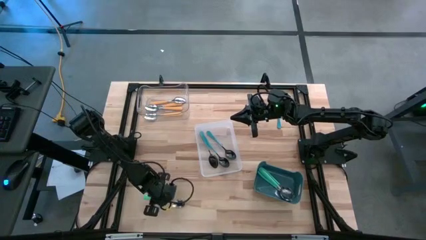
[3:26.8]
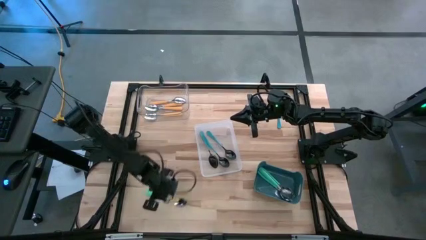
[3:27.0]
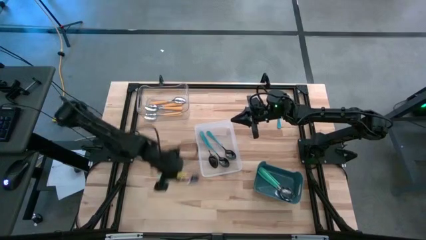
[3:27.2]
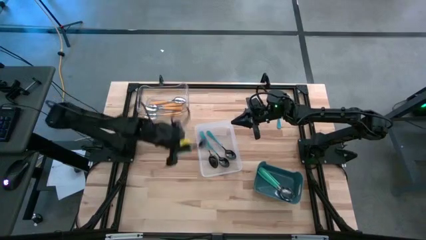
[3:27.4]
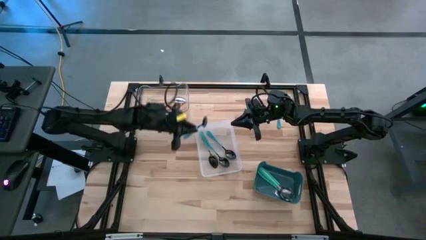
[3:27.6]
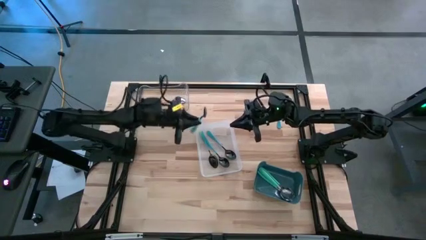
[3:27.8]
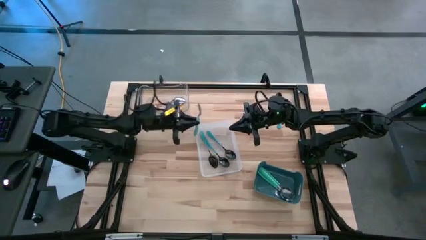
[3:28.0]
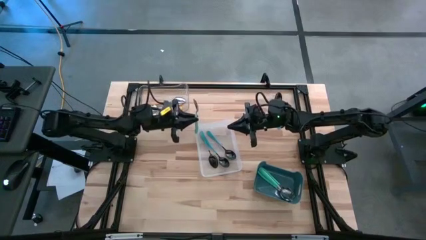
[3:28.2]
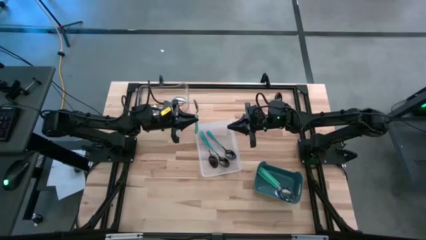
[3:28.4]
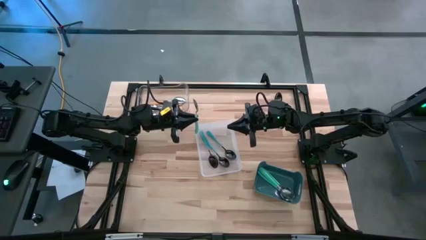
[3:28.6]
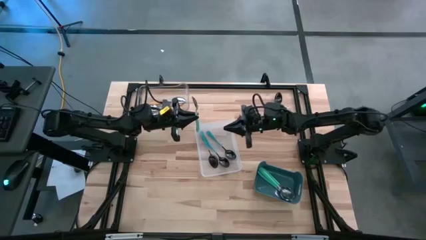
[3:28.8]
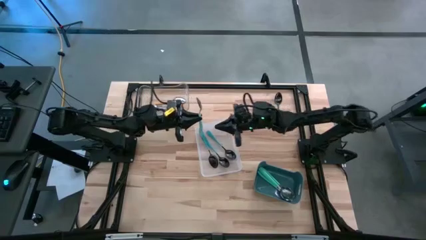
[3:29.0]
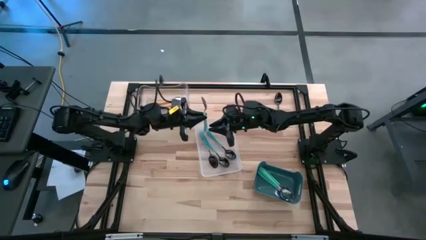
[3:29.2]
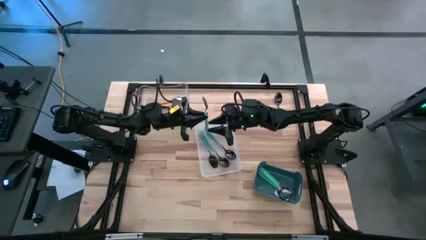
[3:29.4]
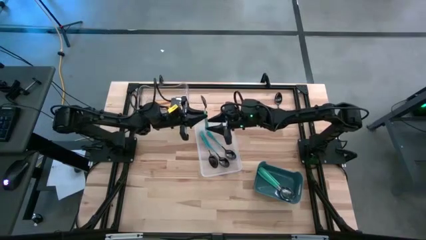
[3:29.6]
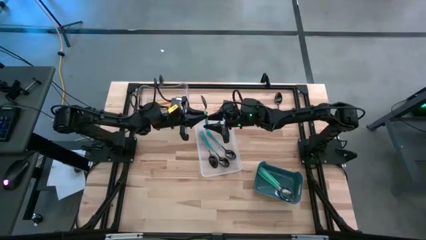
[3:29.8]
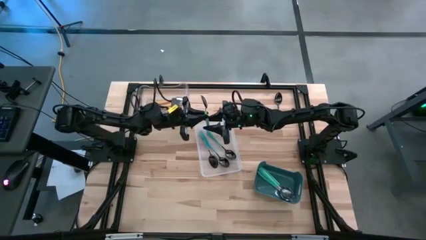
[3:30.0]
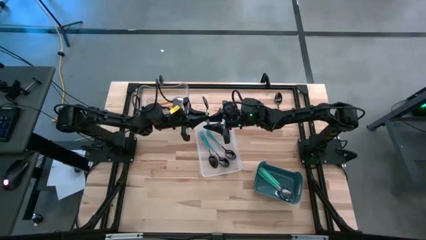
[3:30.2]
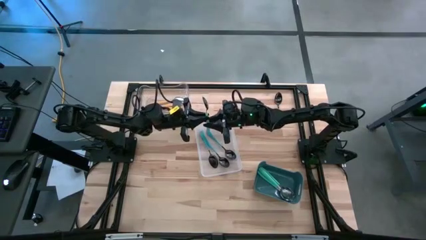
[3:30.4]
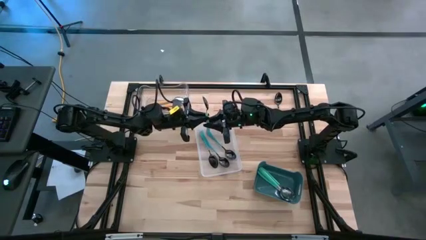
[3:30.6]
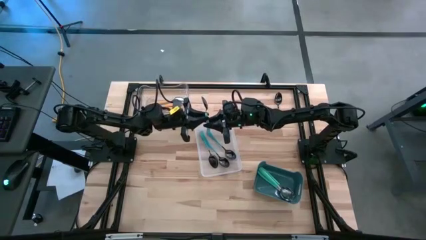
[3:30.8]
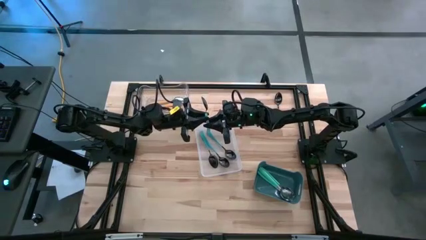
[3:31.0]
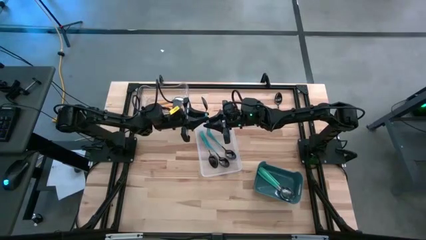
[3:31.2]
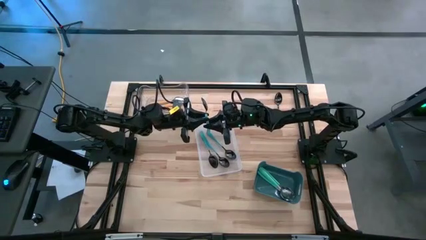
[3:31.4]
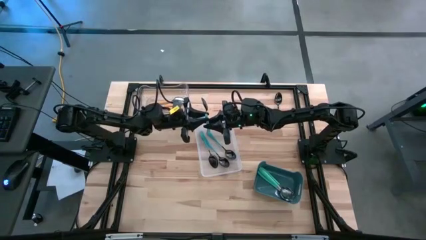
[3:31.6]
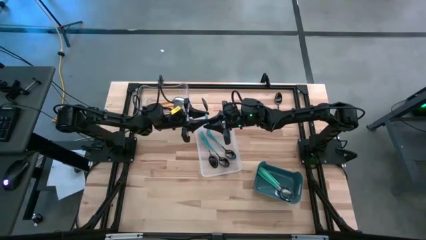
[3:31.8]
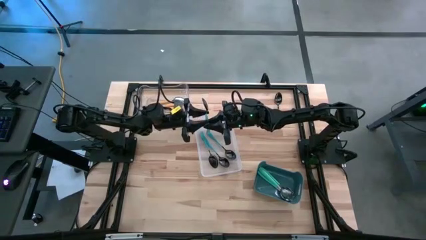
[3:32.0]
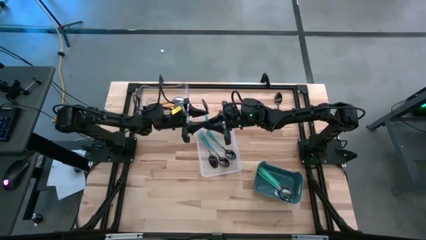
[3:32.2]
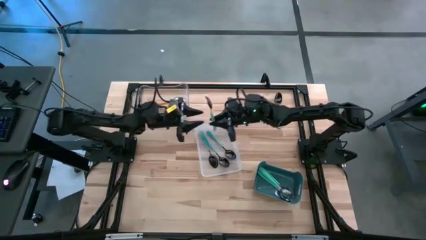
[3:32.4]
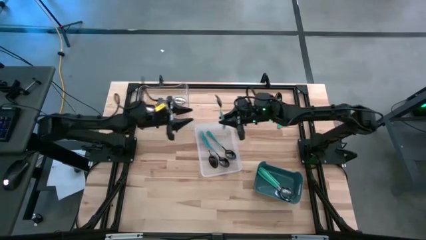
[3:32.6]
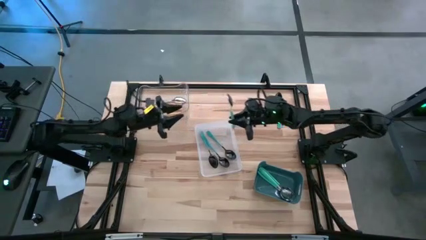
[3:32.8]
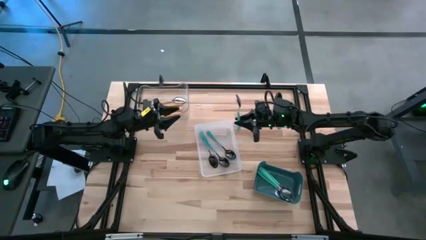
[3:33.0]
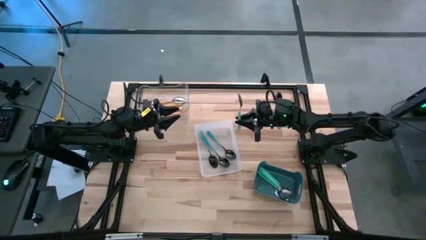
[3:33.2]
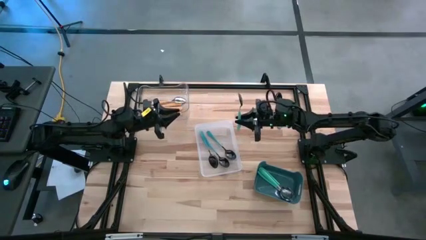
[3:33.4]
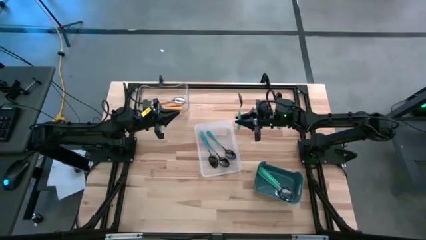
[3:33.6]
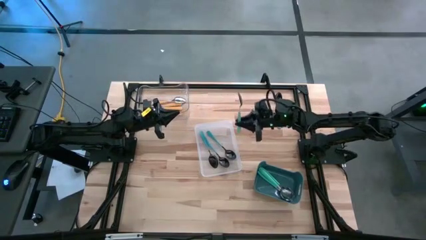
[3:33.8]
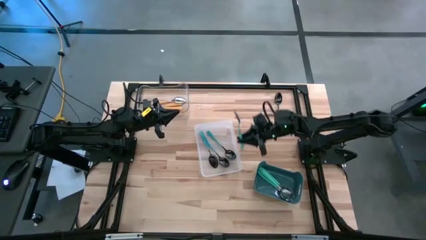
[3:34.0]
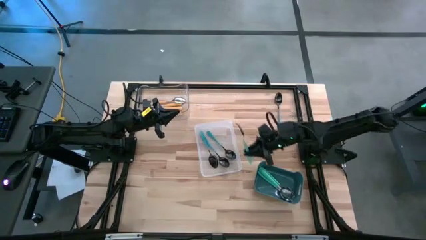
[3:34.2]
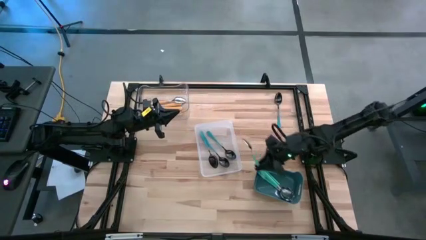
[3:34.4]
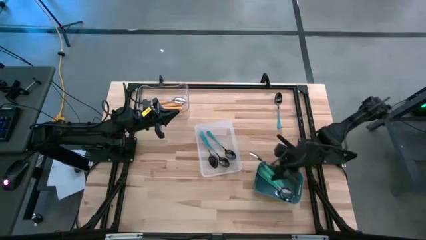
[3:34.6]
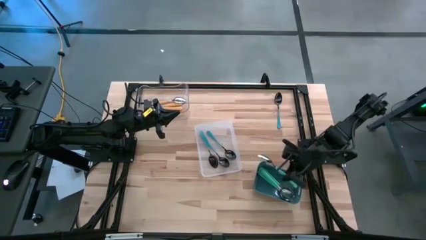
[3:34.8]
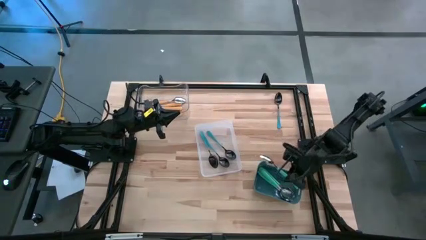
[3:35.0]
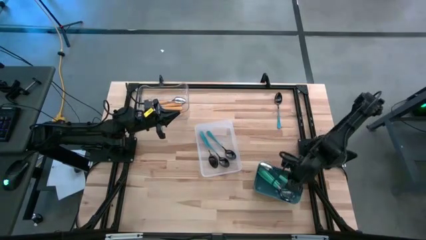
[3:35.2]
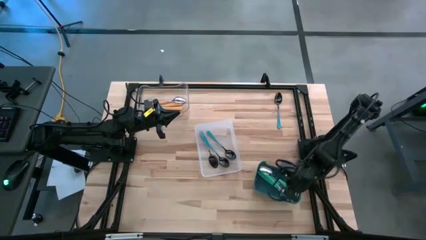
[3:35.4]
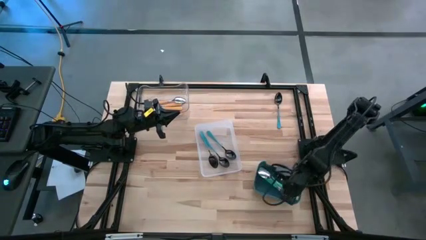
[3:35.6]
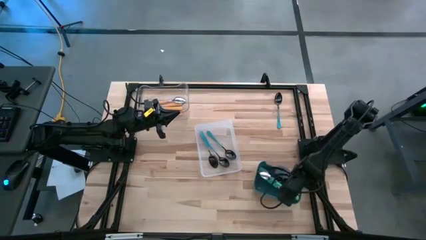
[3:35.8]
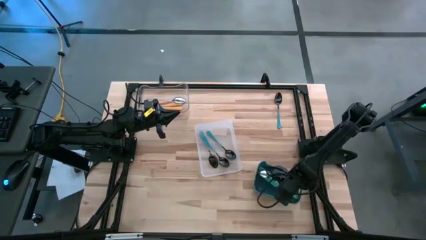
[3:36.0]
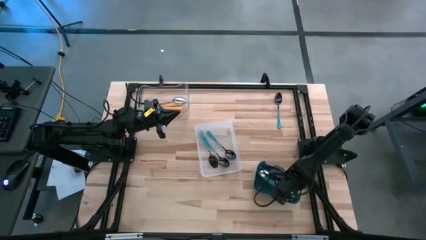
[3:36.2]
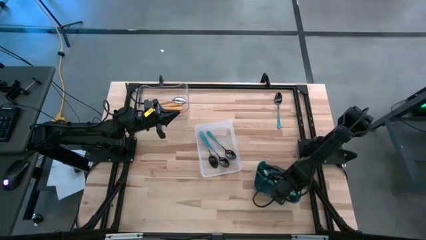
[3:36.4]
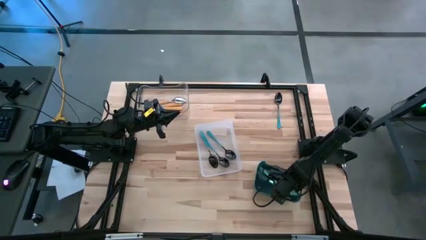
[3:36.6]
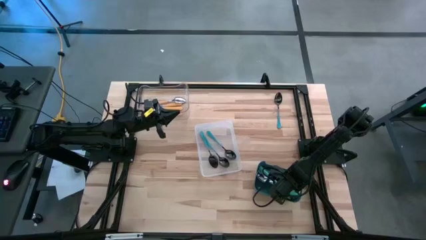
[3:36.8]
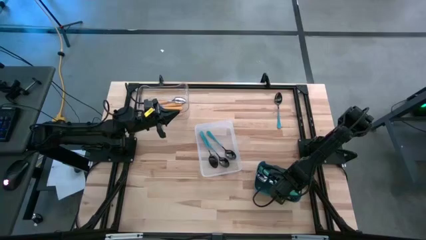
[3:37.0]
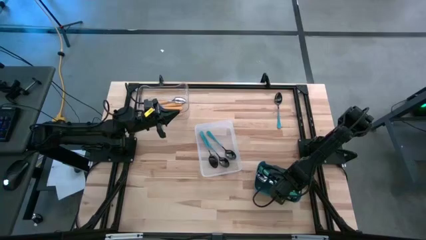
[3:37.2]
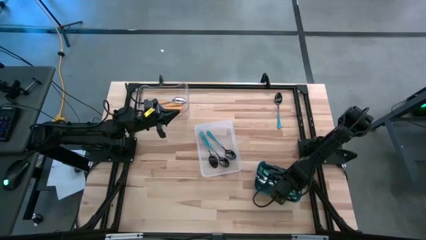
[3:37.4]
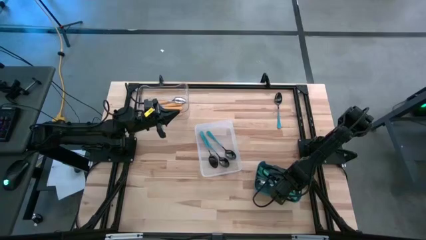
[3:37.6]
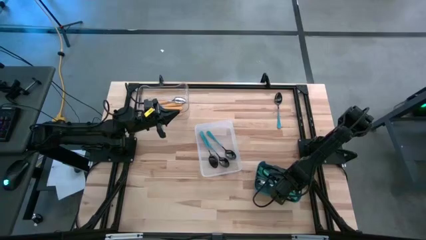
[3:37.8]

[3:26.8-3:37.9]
Task: Sort silverware by color (type)
Put the light blue spoon into the blue bin
